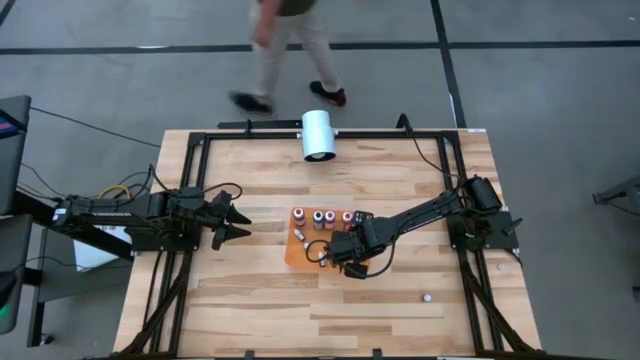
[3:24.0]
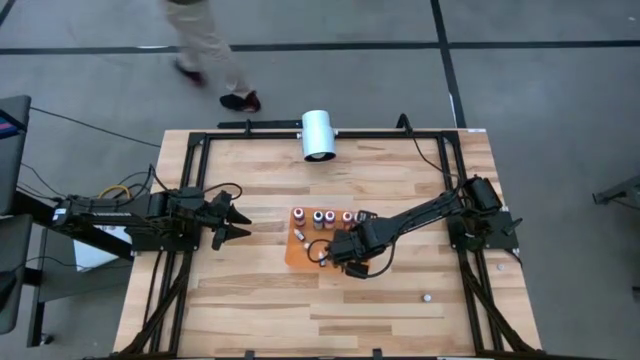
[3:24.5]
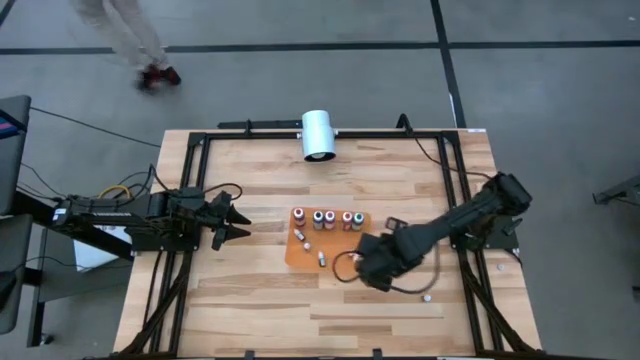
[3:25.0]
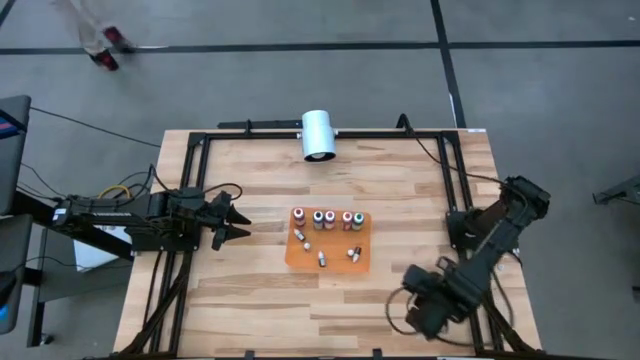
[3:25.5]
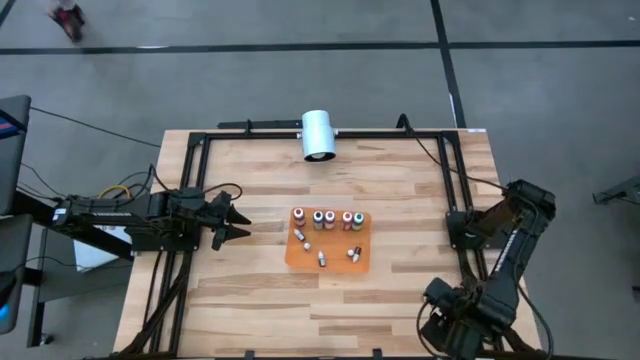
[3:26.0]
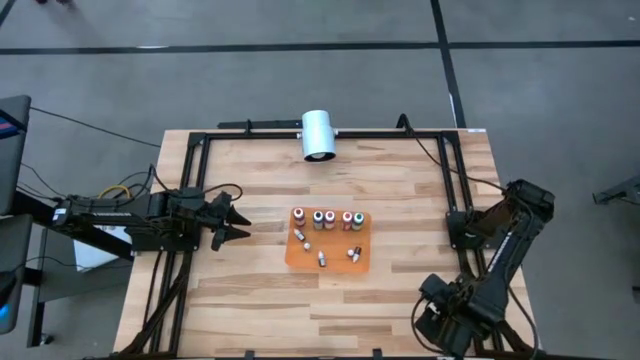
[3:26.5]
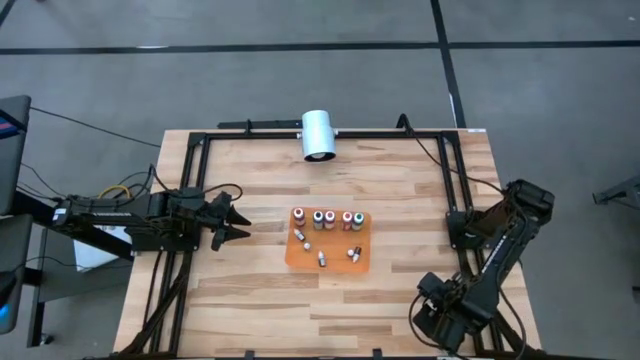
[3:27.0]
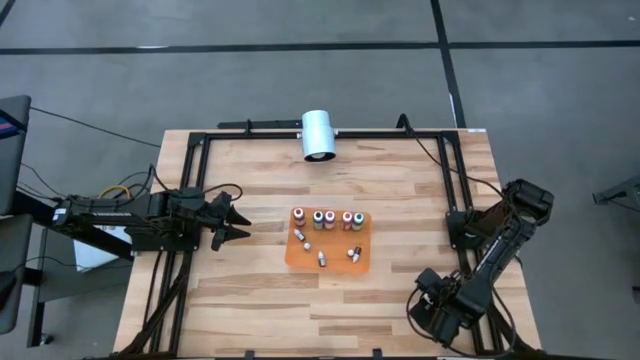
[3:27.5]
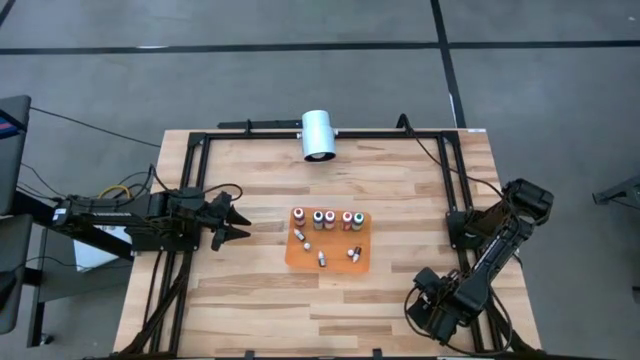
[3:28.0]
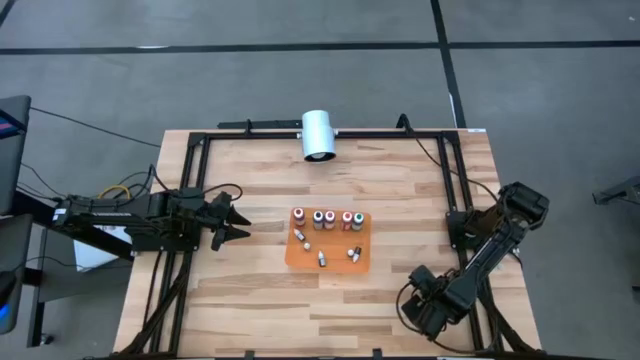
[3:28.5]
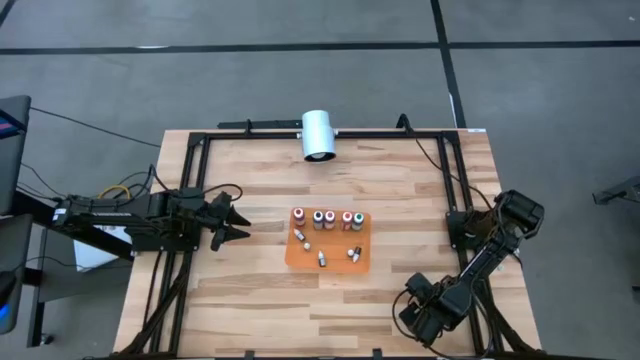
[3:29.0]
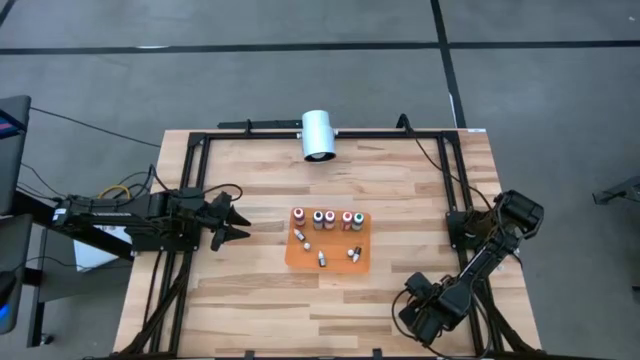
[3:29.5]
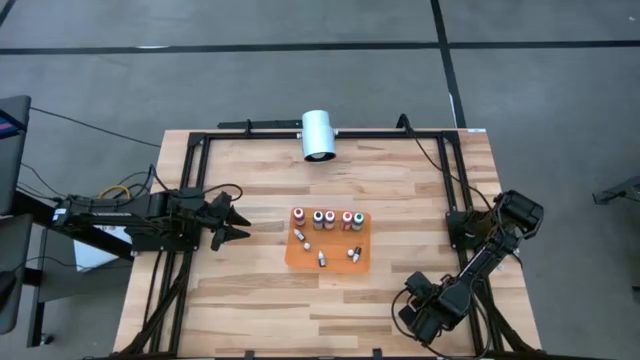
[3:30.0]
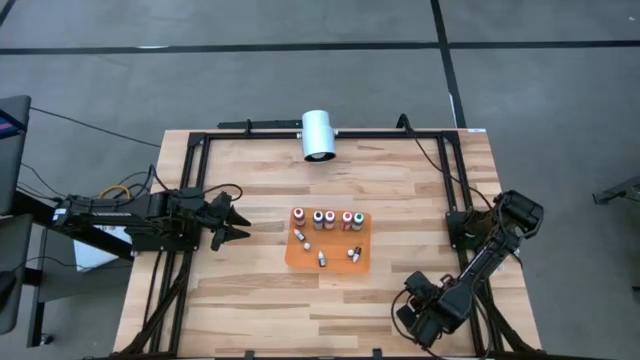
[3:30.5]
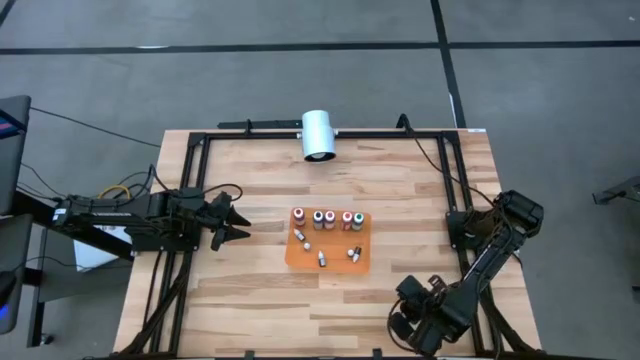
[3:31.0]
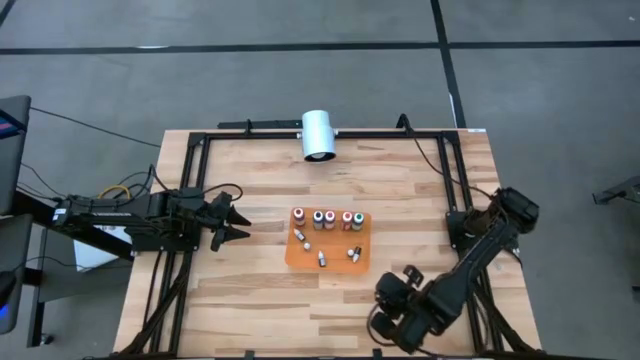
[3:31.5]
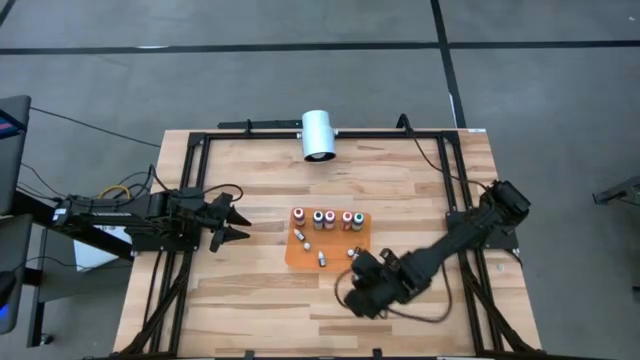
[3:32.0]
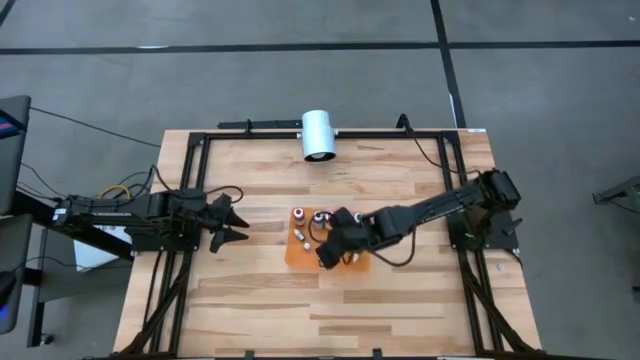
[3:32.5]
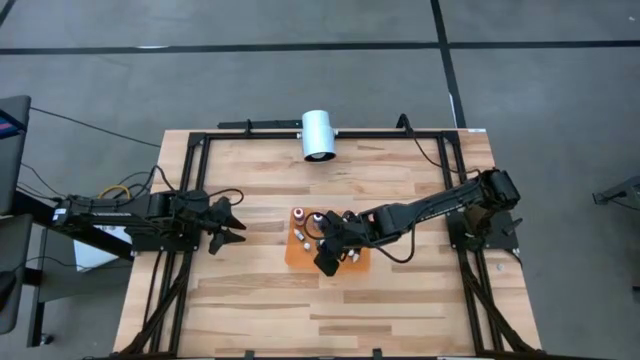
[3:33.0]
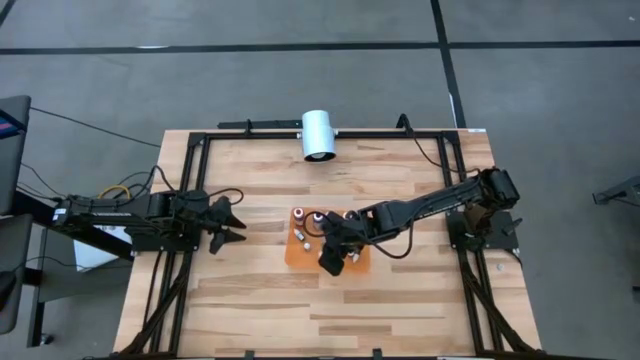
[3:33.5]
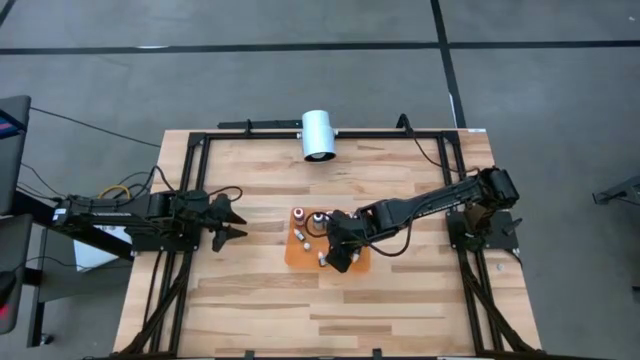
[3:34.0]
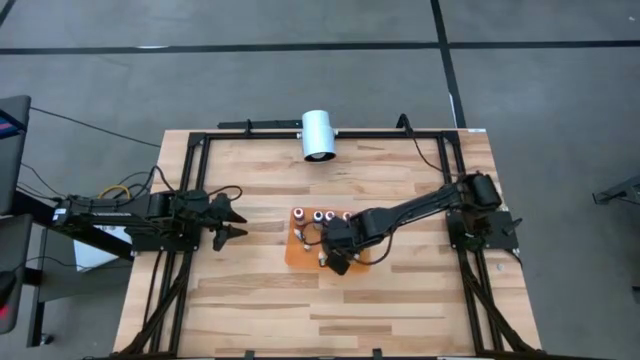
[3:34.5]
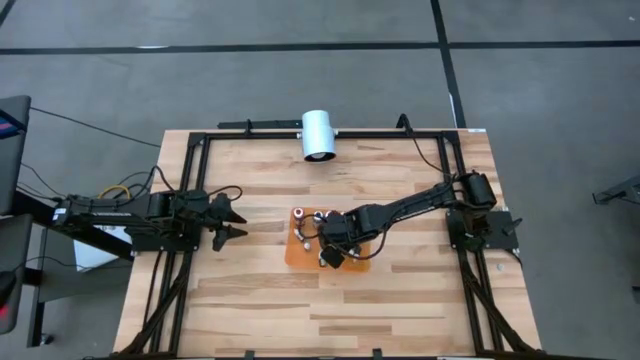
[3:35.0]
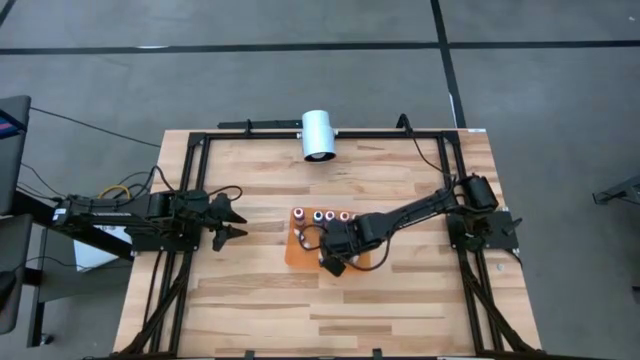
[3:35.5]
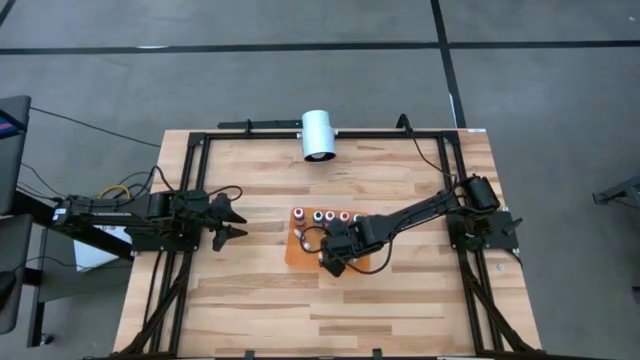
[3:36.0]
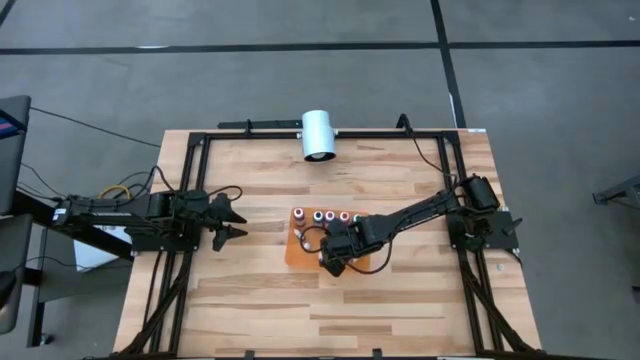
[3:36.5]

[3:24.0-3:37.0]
Task: Pick & Place food coloring
Put the small green food coloring into the orange bin

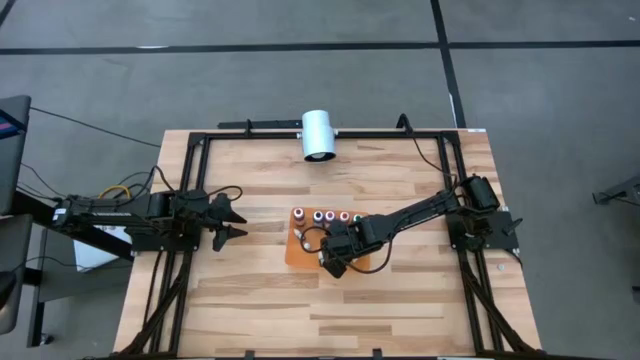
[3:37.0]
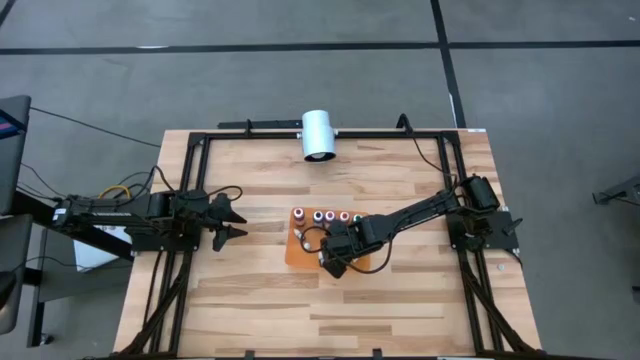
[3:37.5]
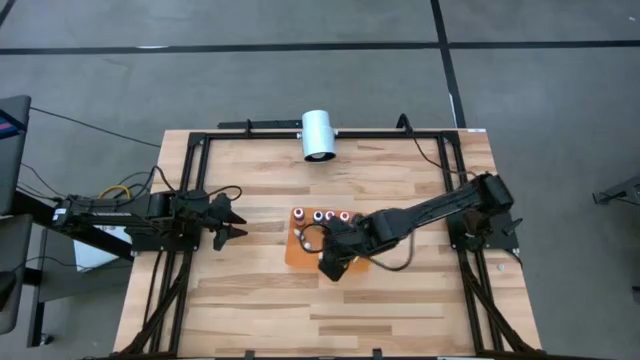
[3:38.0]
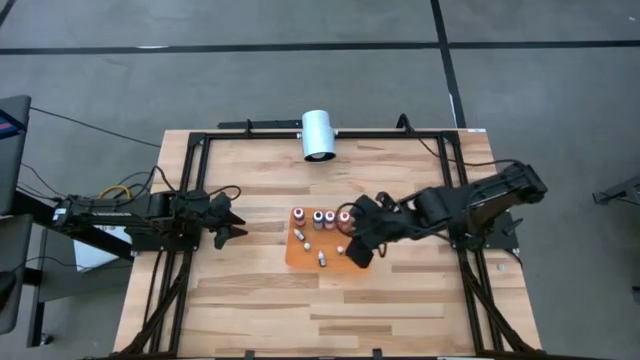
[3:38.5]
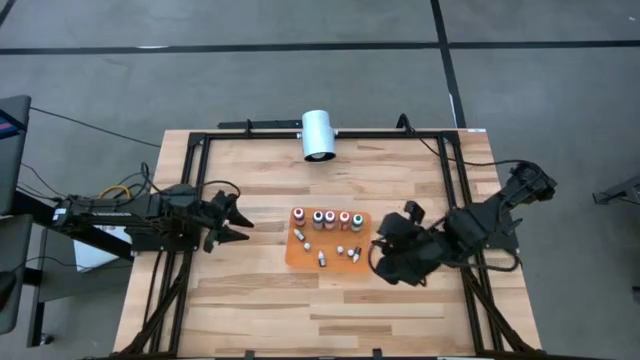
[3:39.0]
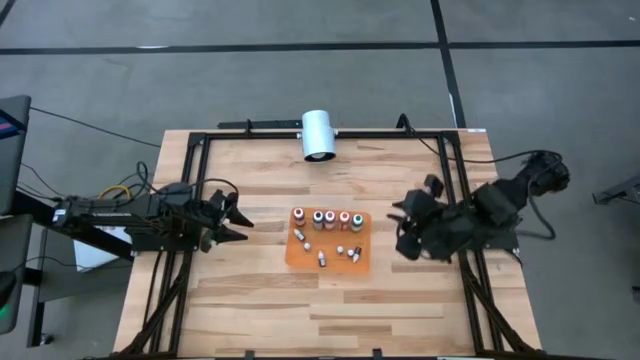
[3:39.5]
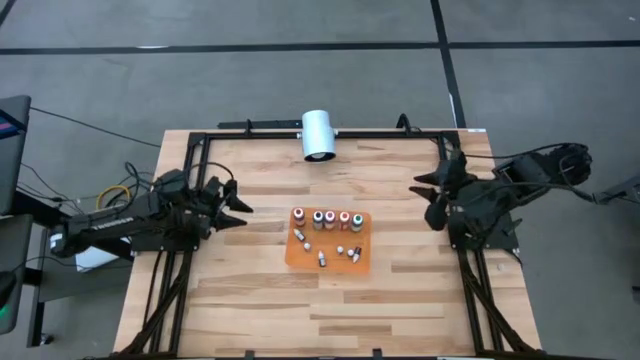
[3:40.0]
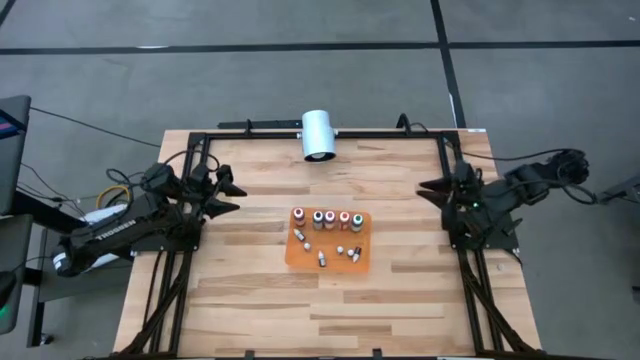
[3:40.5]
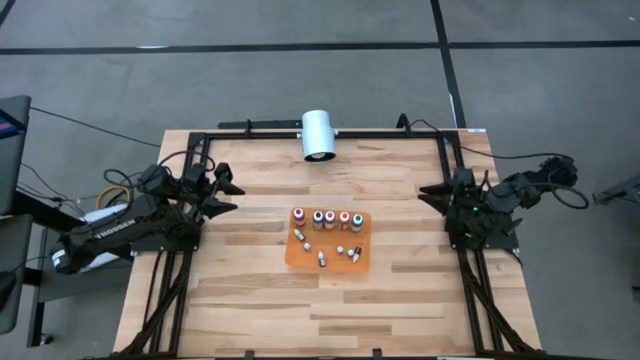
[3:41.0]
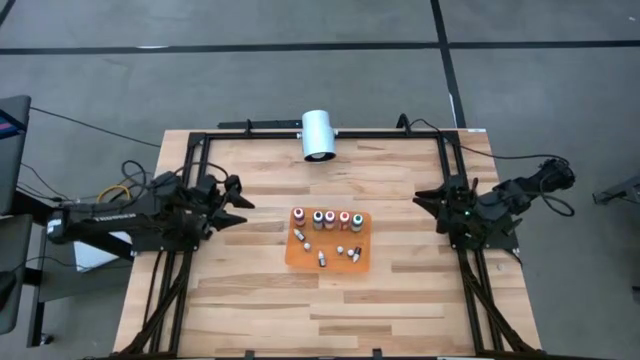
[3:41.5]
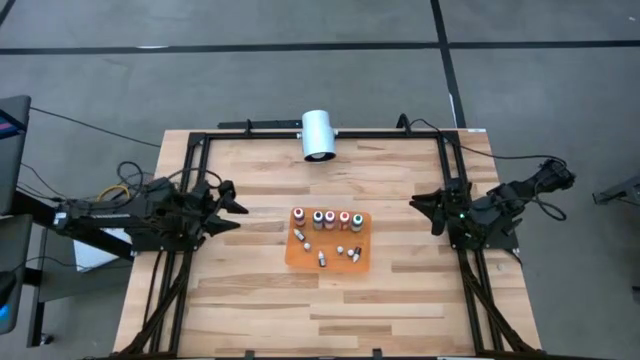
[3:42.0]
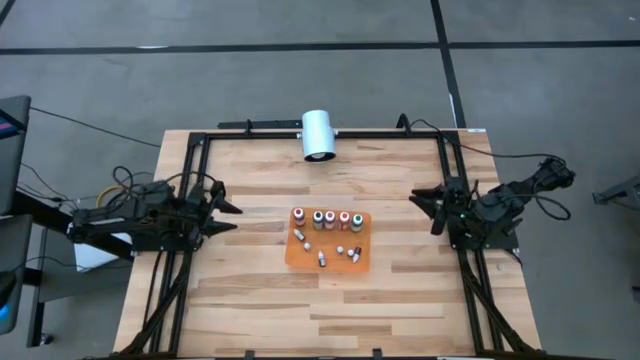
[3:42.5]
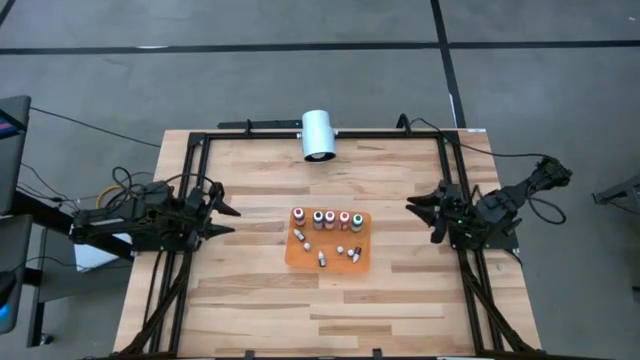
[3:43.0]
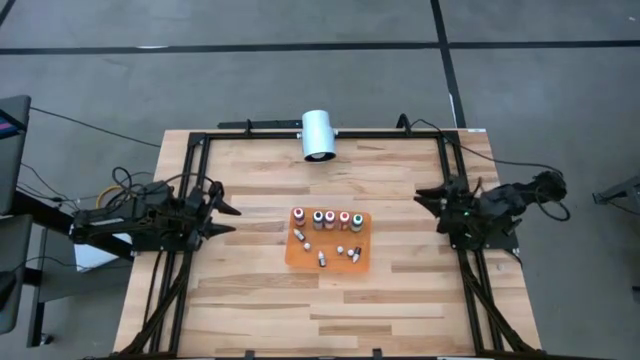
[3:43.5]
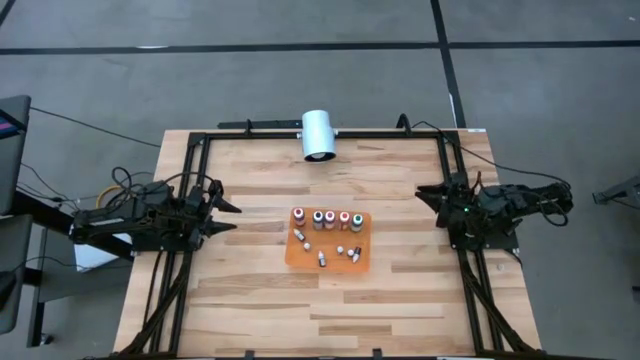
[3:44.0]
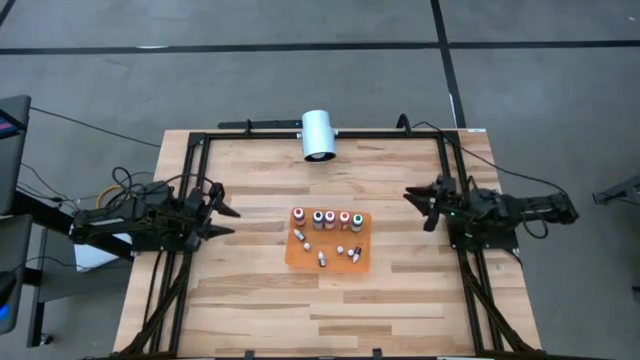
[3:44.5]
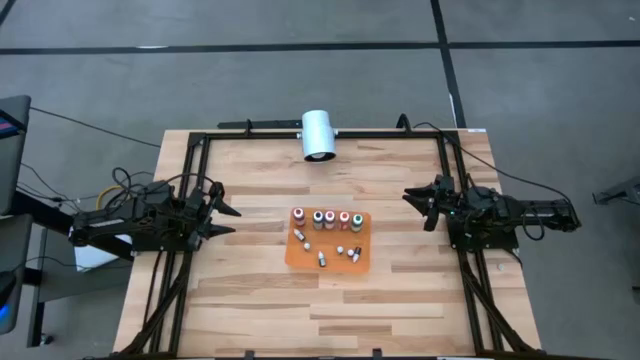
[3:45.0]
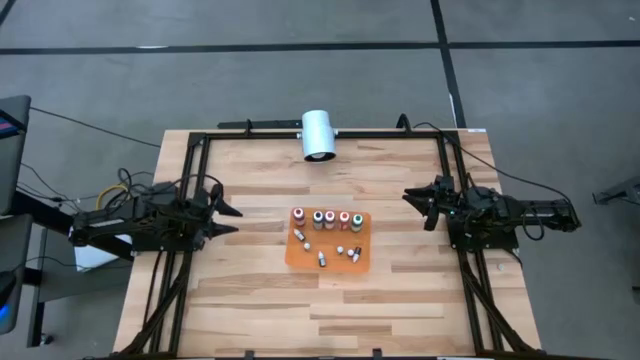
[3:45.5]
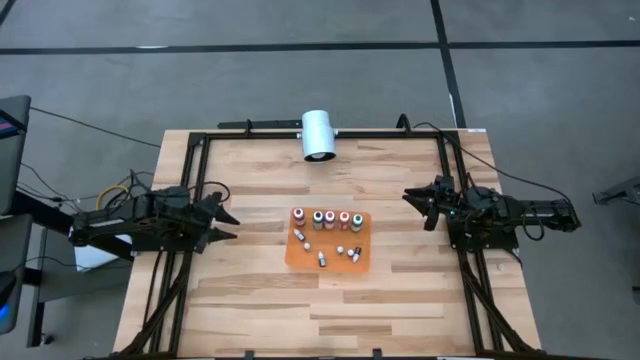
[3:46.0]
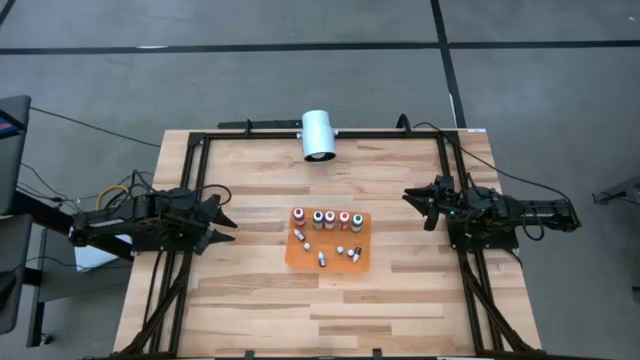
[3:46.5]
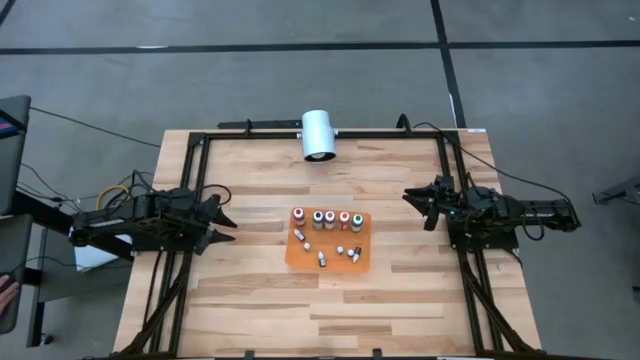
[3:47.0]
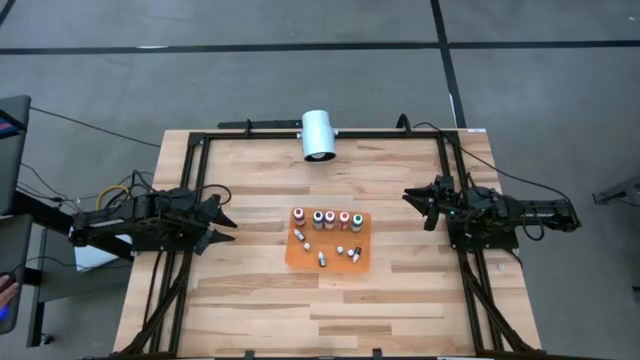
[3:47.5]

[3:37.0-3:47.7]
Return to Home Position
